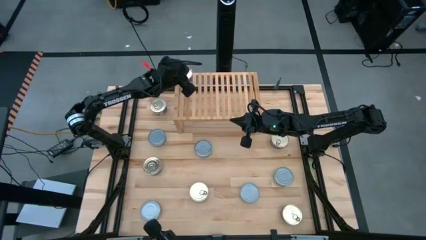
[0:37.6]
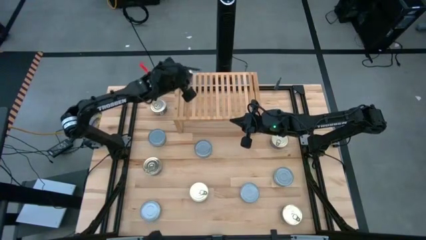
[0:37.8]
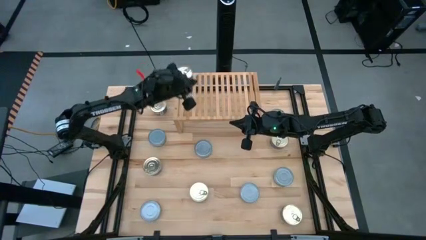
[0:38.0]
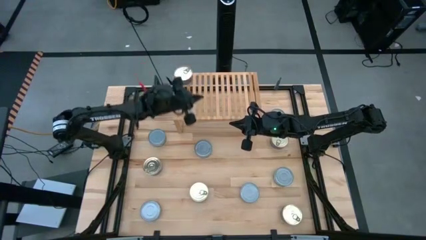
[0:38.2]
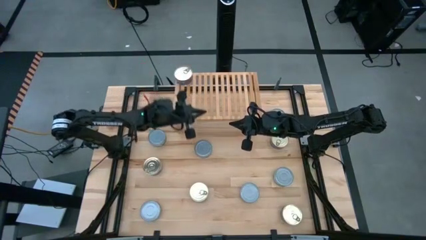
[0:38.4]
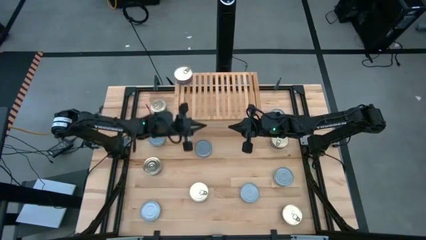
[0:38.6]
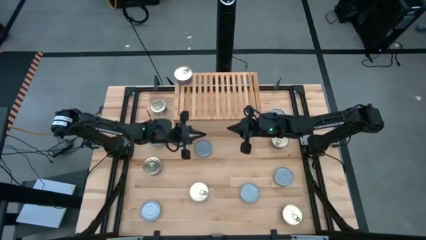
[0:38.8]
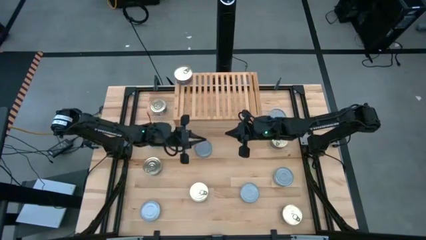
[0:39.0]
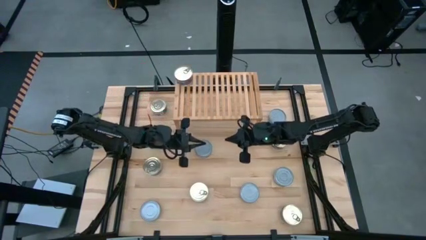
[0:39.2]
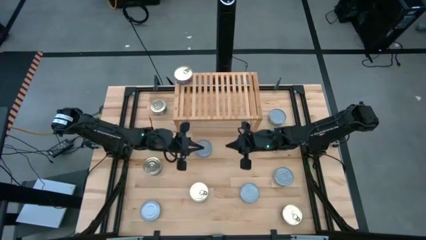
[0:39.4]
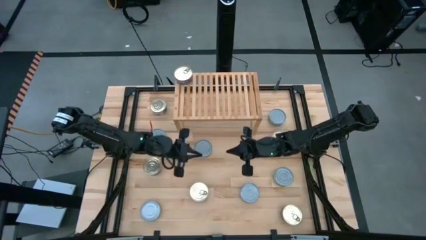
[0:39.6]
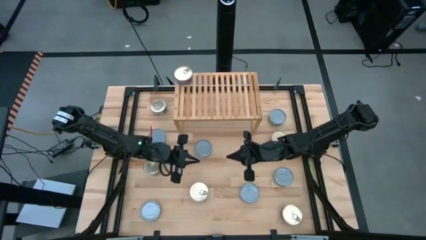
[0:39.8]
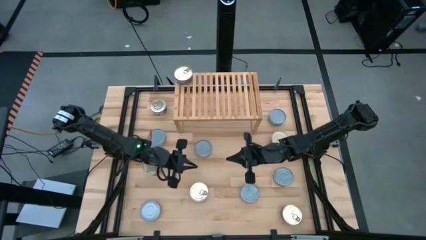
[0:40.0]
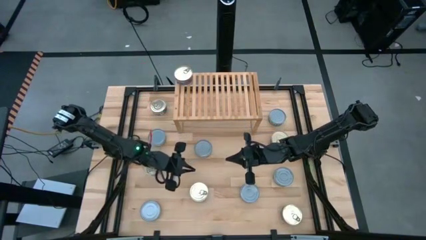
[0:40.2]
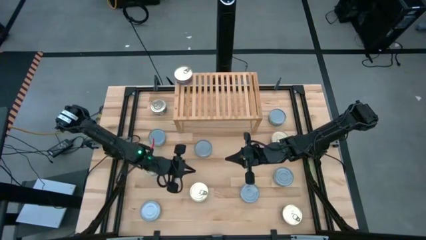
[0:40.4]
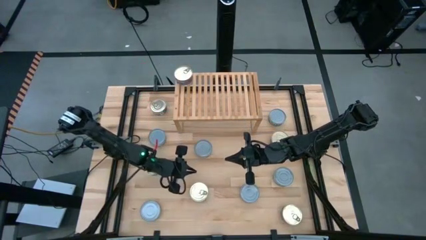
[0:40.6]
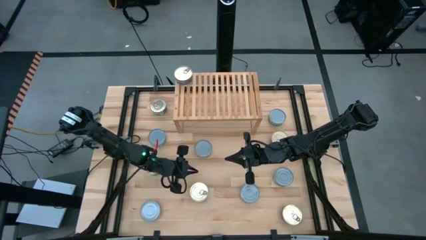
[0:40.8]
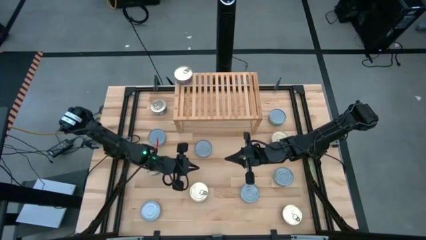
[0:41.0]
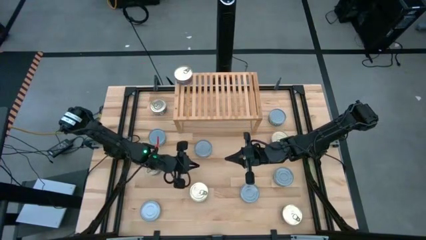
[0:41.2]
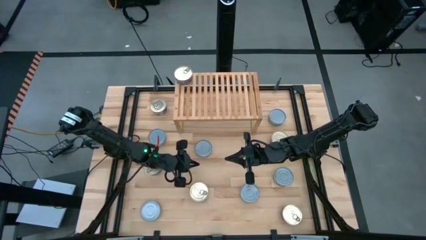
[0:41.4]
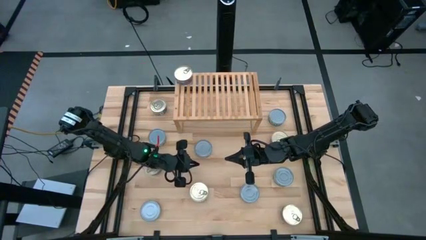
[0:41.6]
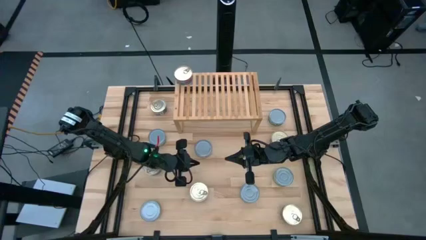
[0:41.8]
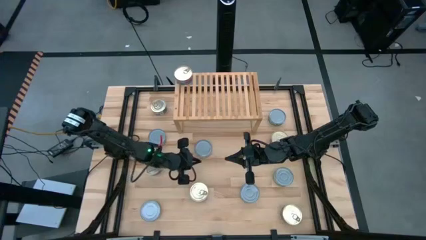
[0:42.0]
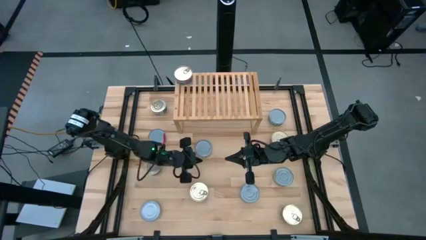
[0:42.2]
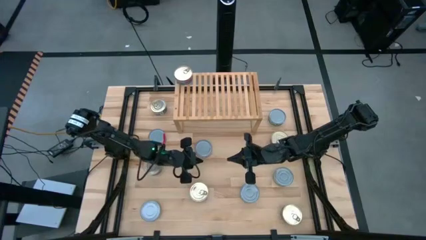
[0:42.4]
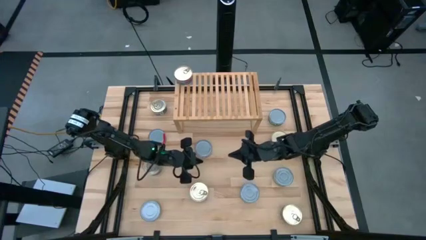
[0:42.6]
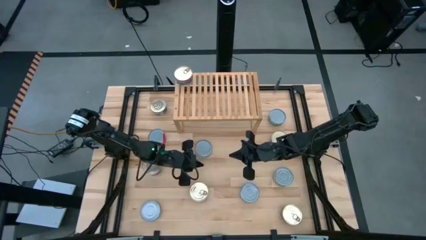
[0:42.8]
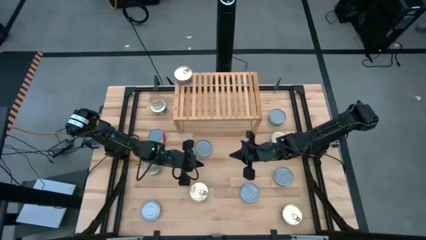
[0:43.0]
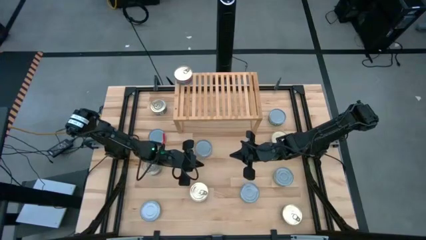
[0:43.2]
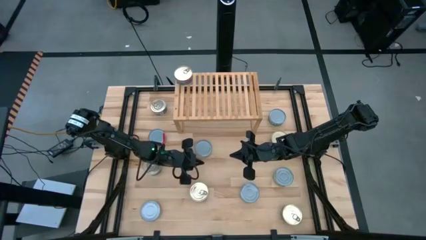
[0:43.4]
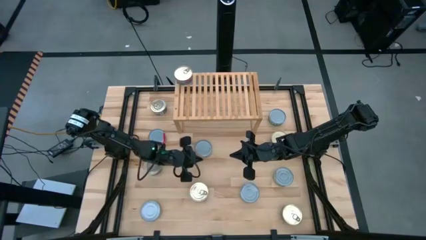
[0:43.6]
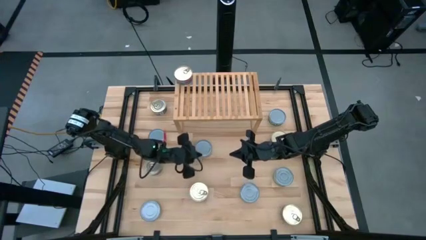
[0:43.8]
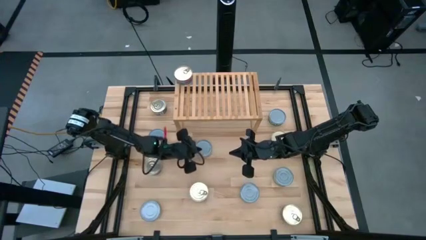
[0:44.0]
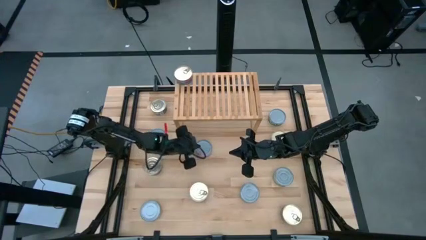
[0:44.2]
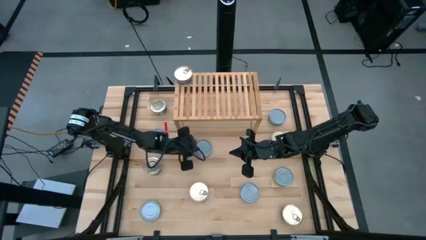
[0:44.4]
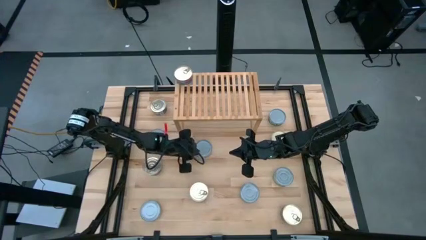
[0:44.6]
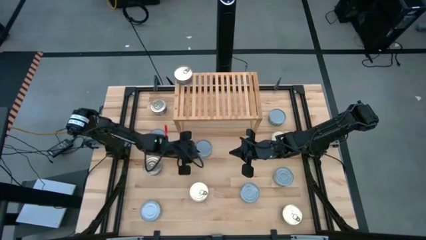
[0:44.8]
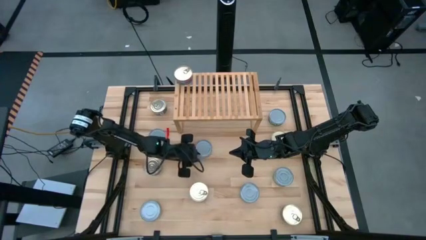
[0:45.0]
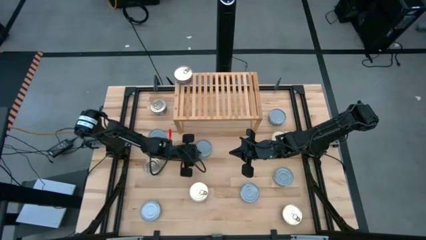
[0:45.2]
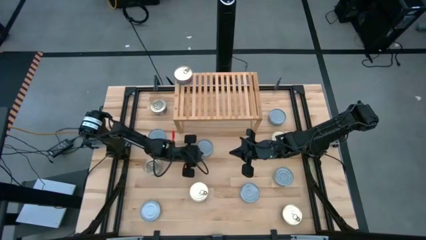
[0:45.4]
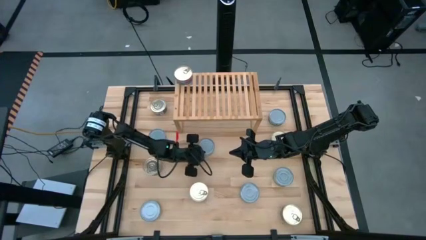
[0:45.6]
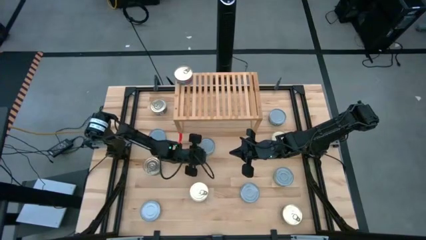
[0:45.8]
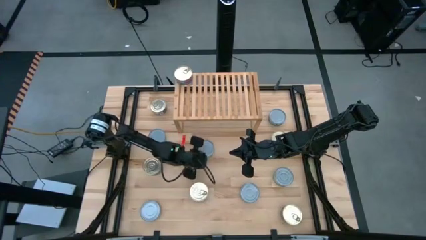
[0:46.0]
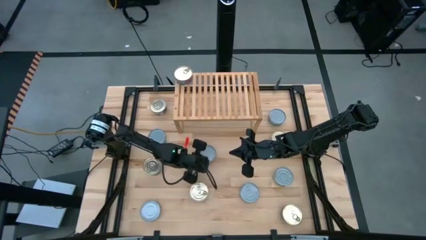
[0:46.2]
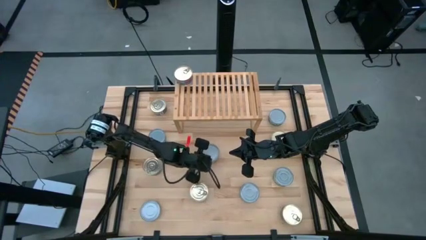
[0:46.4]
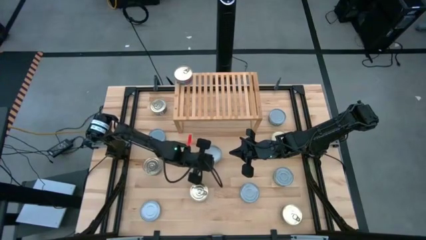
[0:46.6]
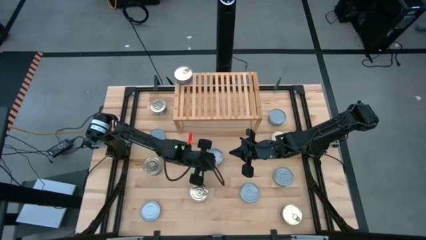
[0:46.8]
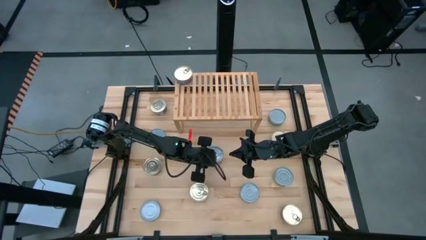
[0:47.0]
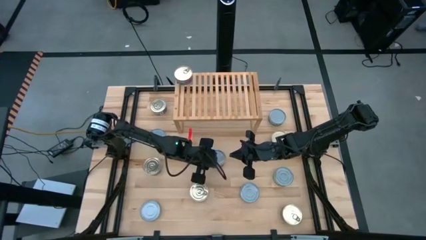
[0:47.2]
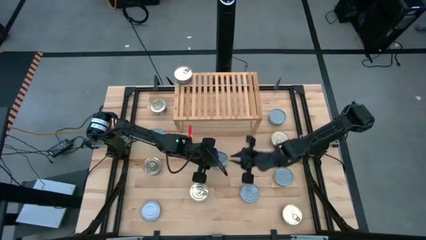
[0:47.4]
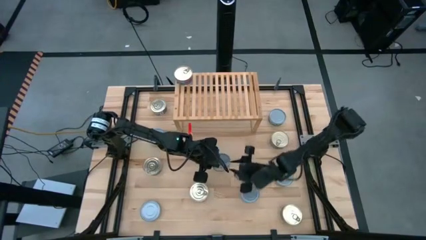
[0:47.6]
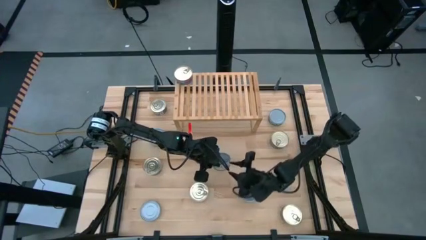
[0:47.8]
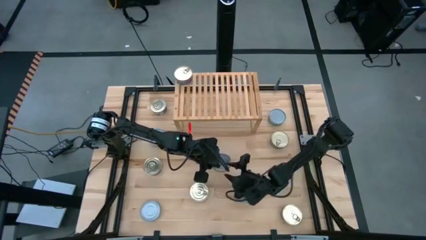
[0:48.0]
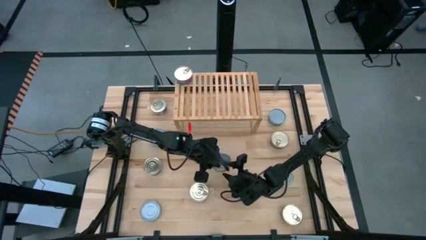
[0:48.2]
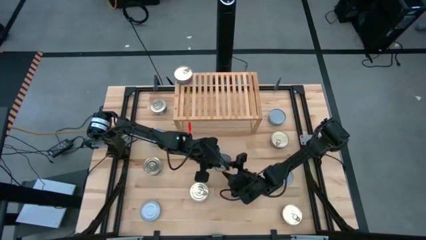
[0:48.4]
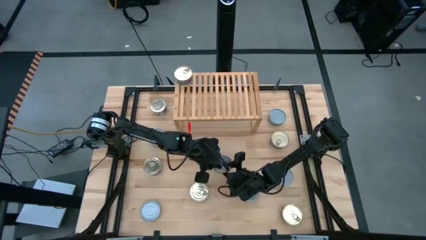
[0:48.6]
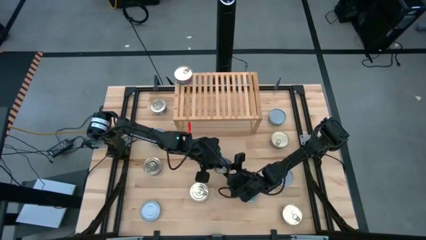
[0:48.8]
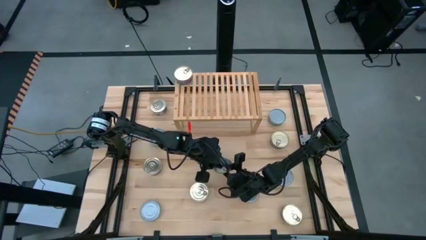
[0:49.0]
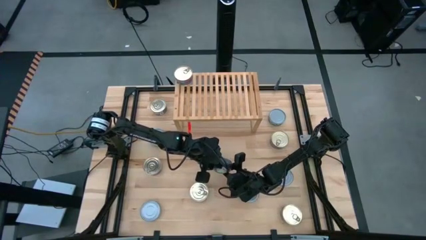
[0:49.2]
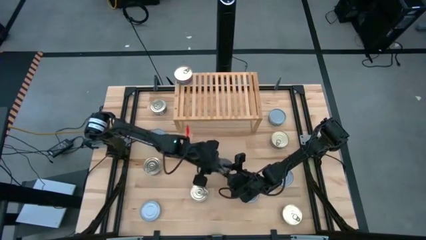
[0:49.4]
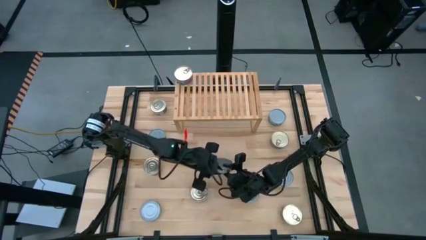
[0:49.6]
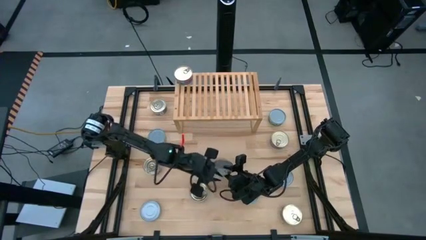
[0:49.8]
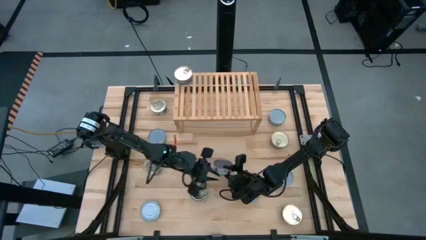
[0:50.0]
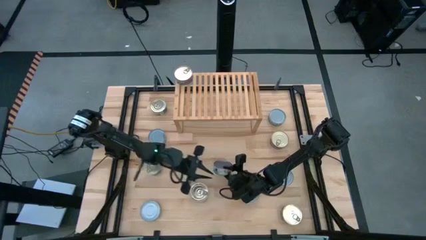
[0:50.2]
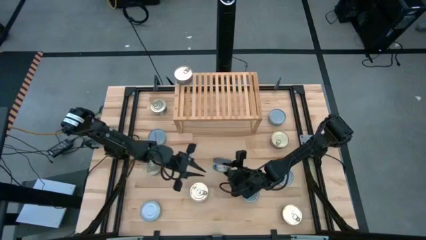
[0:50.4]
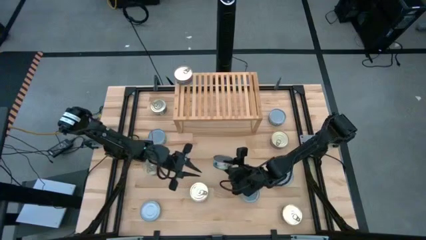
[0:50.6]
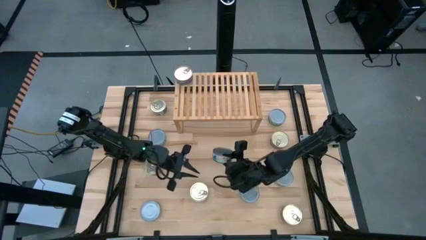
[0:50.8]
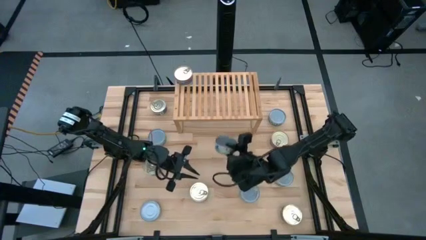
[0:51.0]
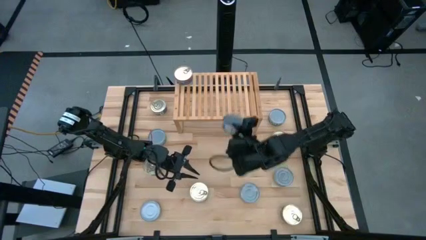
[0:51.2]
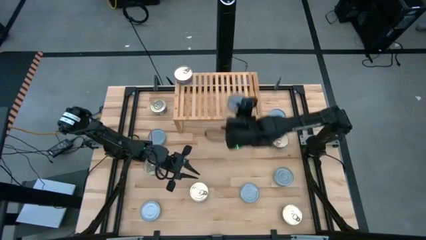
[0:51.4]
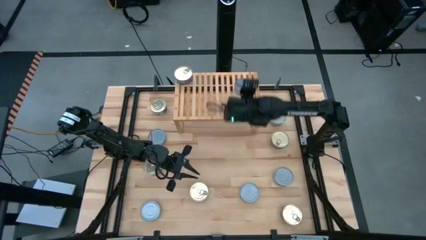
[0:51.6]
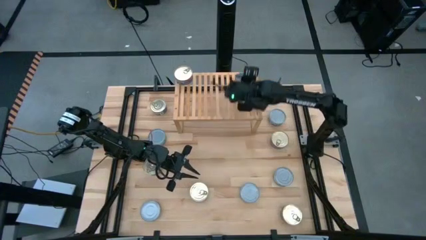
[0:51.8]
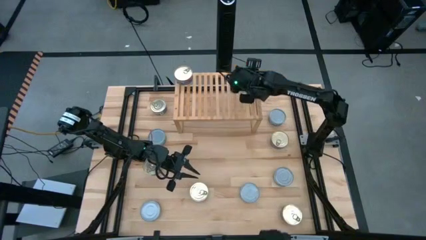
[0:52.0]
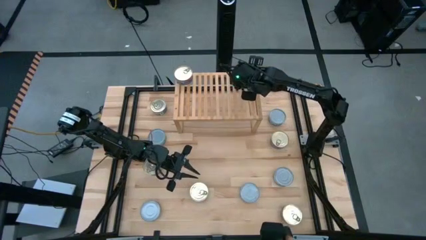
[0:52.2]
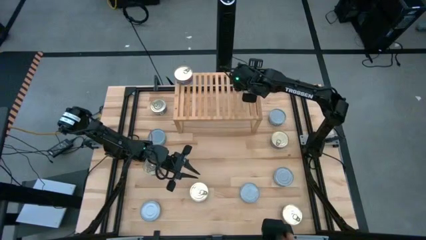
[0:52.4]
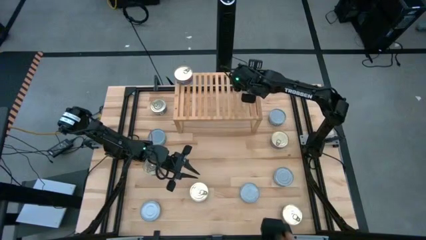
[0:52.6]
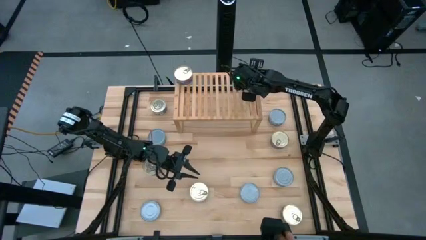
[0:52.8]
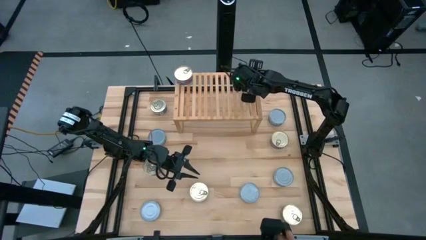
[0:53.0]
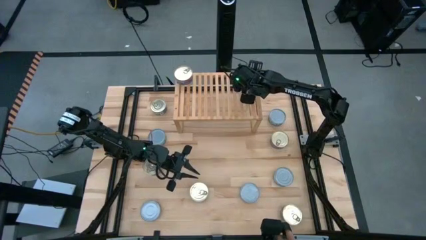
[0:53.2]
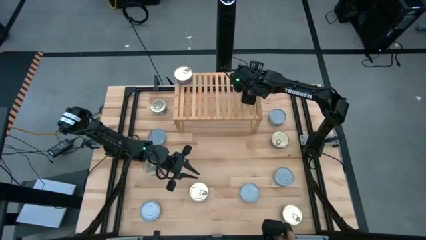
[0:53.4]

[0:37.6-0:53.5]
Task: Stack canned seafood by type on shelf
Put the green tuna can on the shelf
